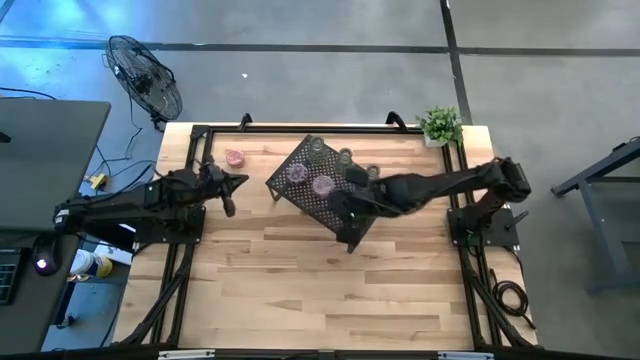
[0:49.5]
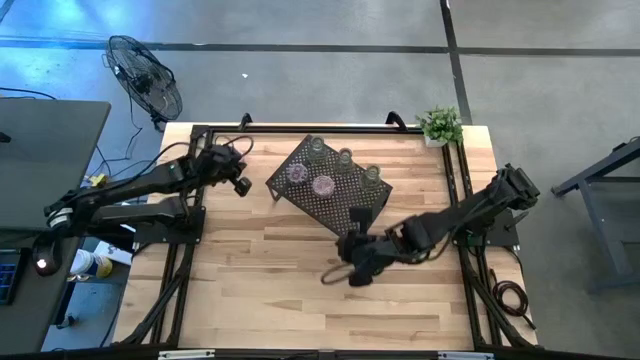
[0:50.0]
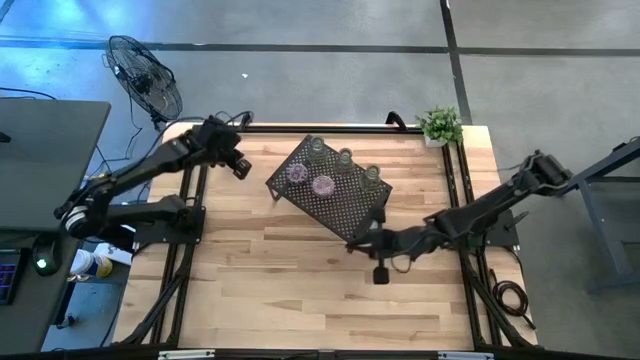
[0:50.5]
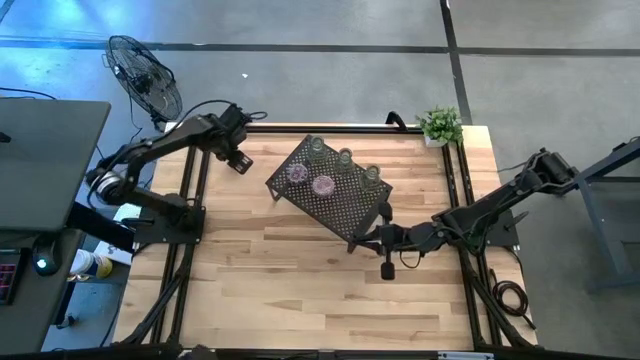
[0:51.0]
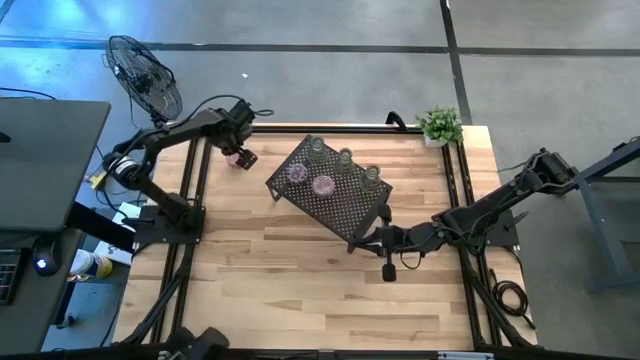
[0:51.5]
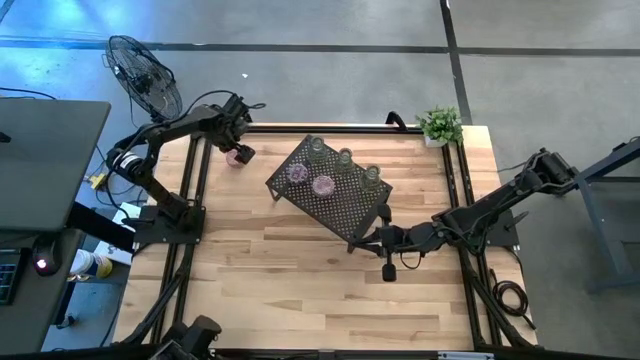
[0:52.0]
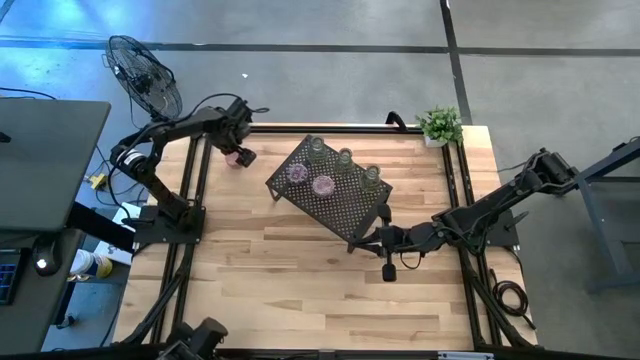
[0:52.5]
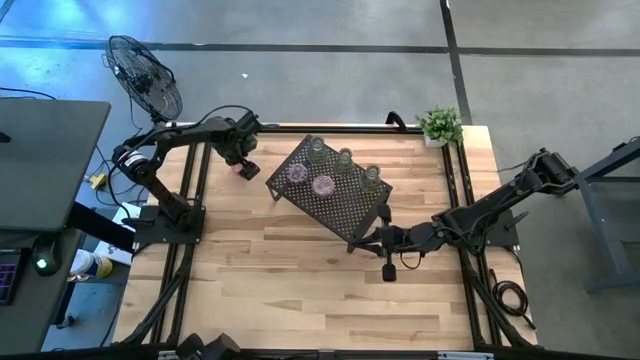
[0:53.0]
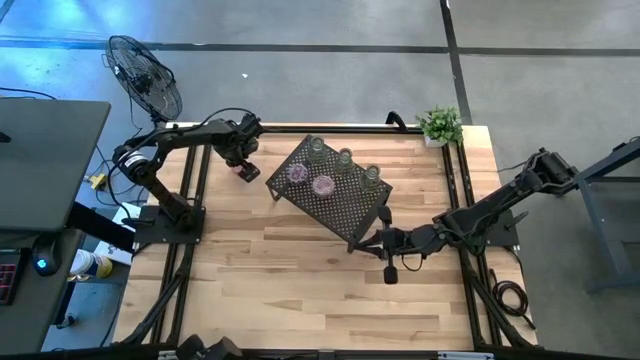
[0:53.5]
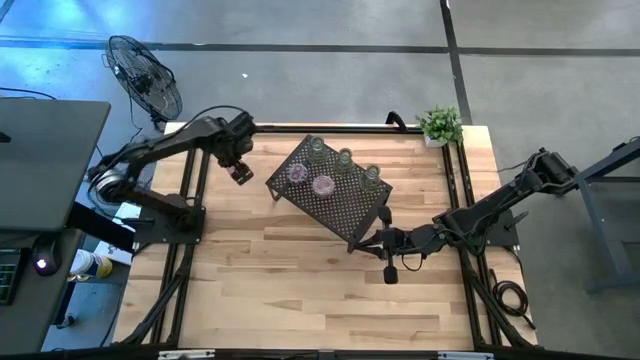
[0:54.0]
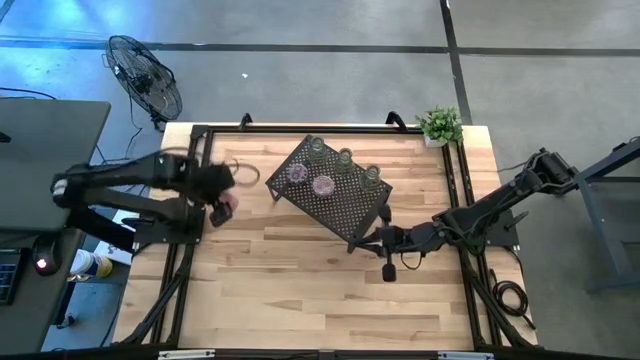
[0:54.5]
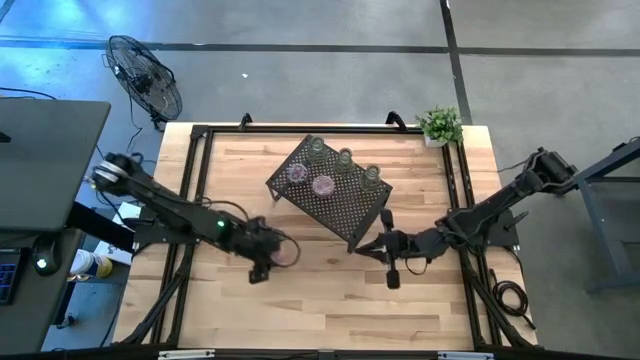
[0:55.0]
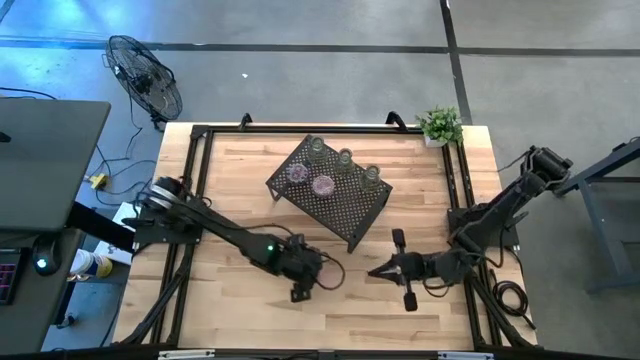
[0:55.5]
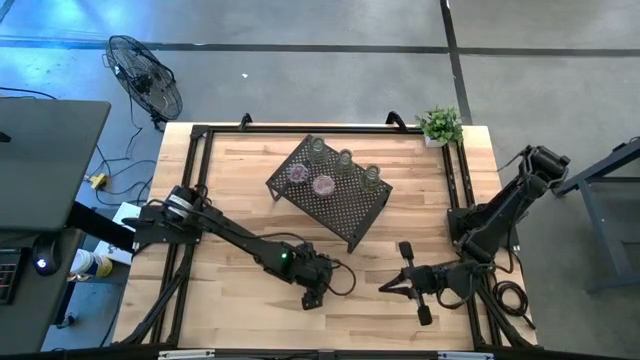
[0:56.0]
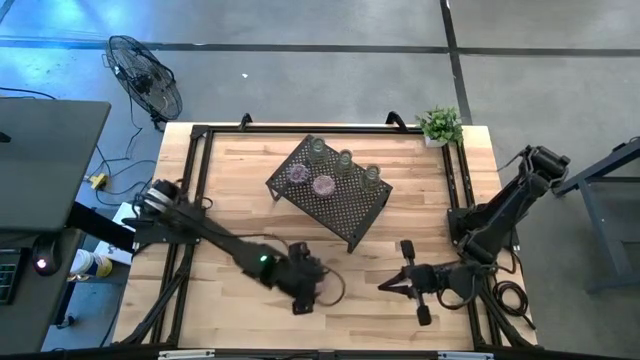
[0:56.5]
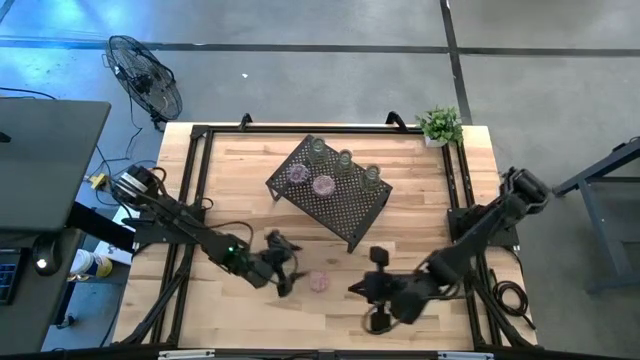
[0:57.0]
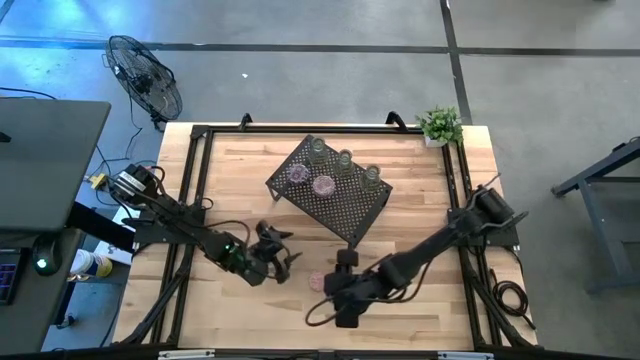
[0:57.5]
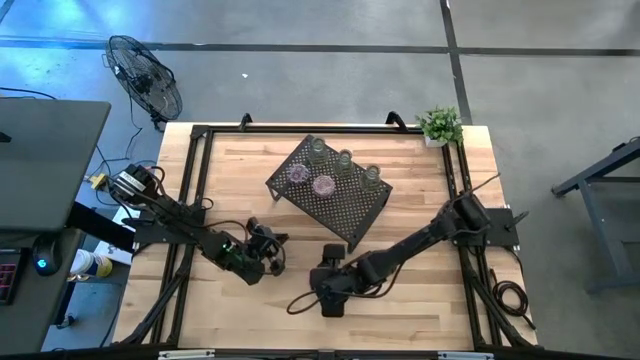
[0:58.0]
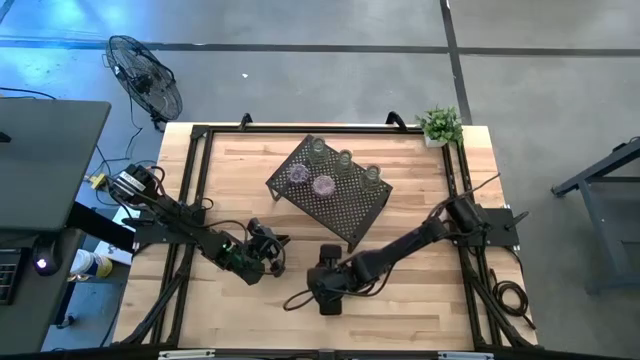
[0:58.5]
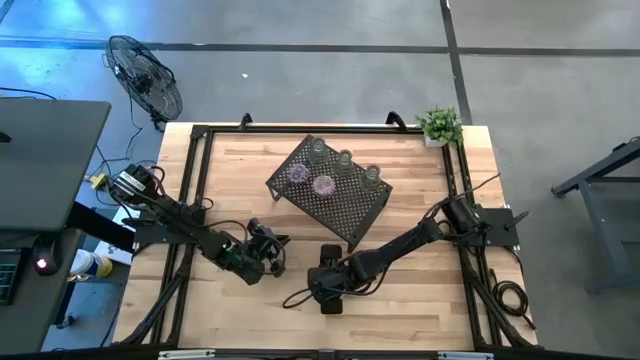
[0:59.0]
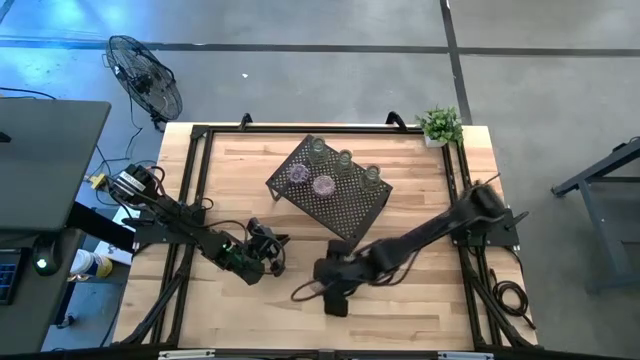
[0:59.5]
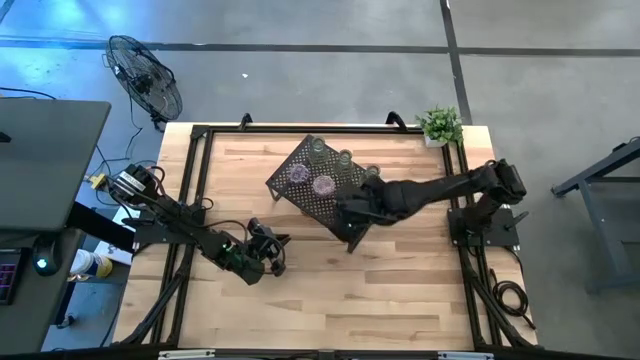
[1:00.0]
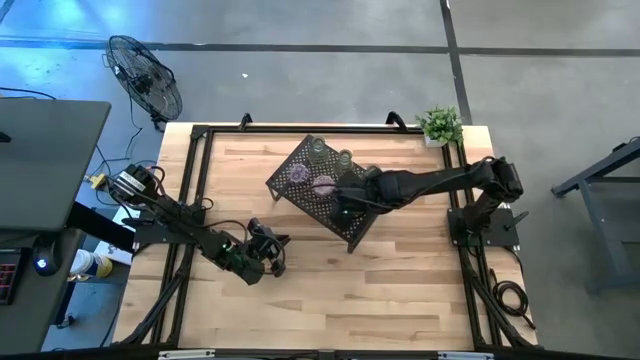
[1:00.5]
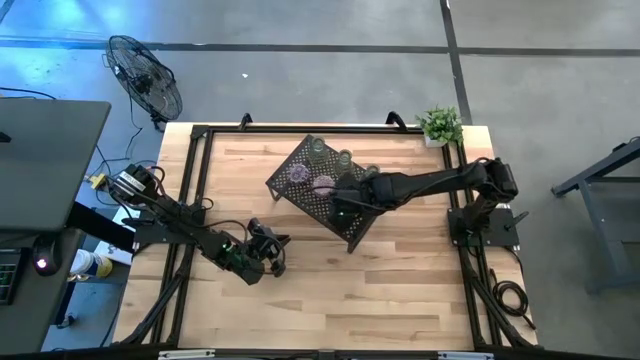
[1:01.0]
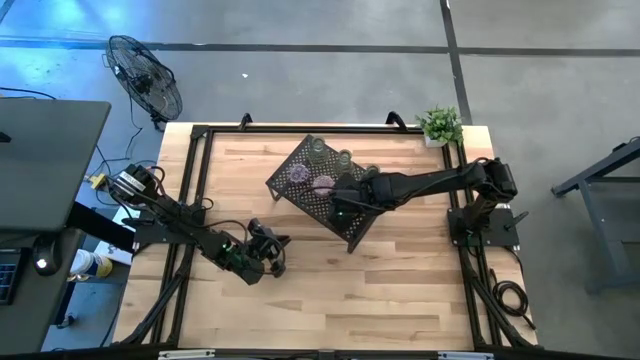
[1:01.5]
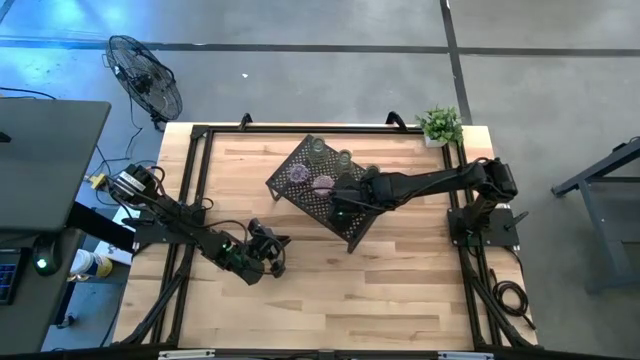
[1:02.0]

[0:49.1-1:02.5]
Task: Pick & Place candle stick holders
Put the pink scented candle on the shelf

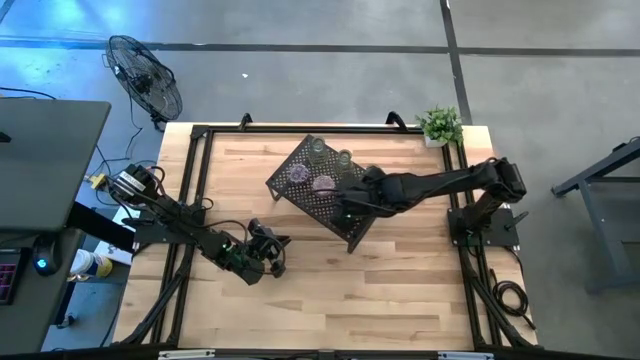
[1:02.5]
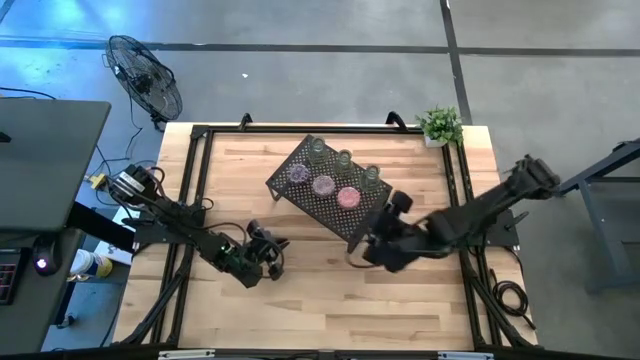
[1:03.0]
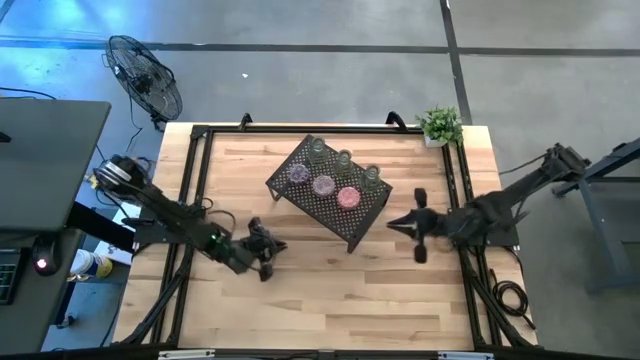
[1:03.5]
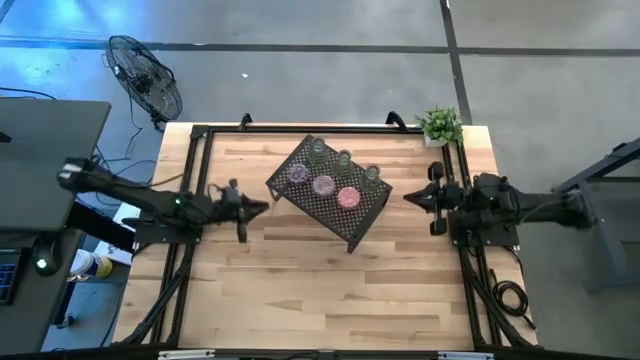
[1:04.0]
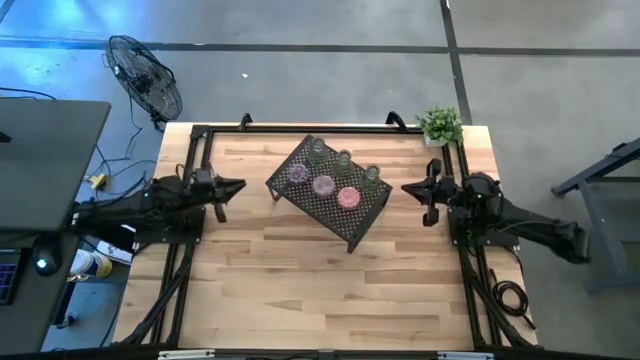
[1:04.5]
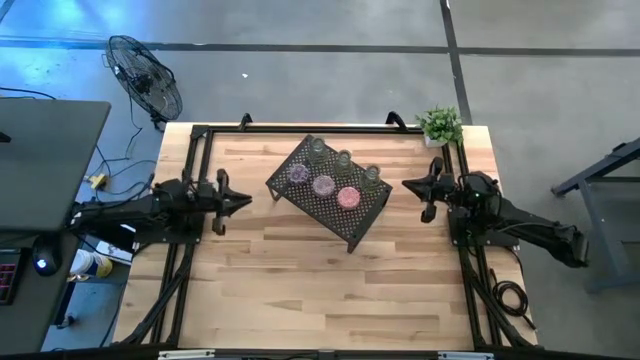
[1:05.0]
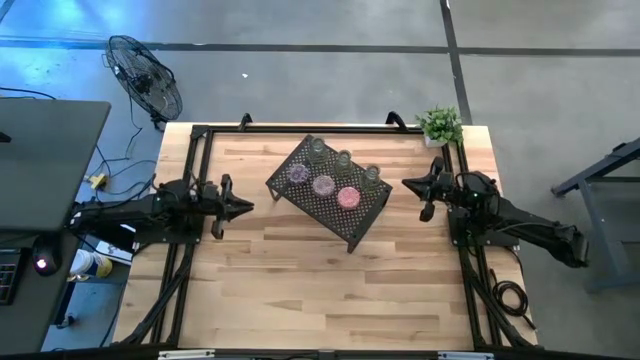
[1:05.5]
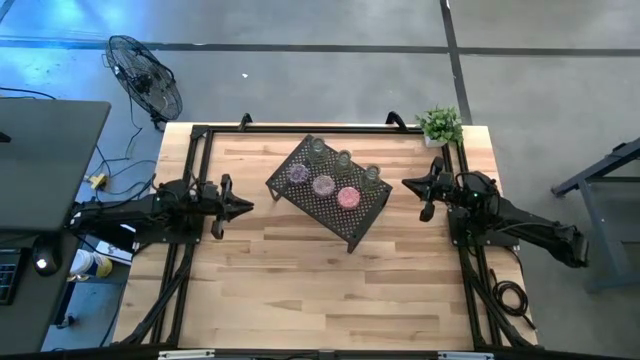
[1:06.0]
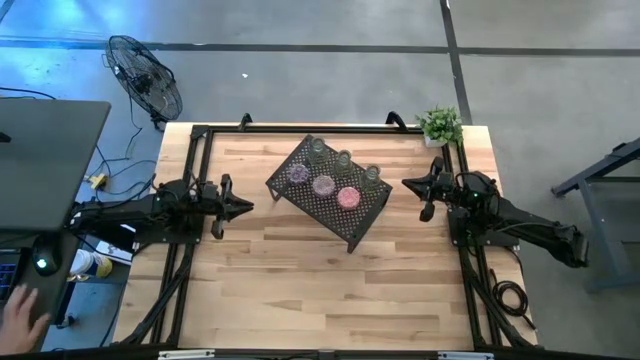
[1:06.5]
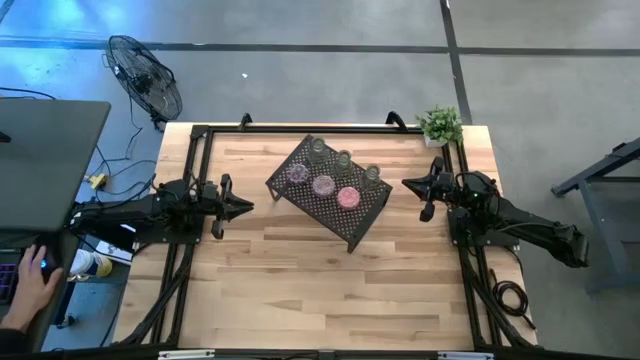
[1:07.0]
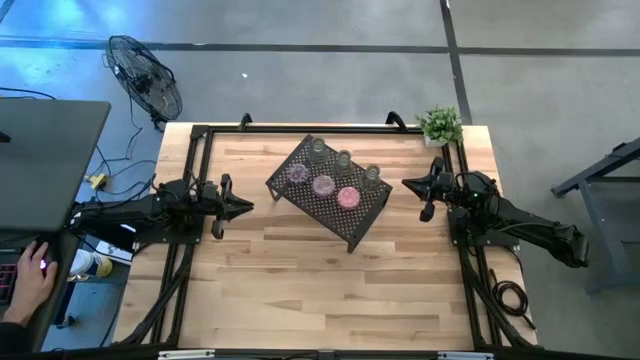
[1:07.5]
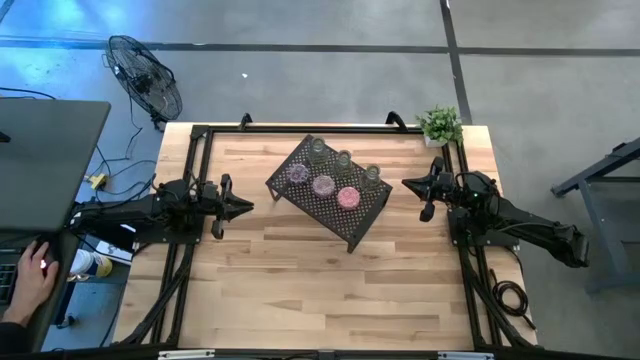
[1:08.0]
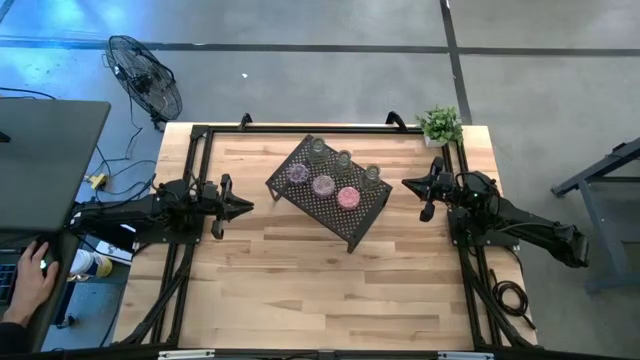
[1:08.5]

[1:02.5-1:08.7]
Return to Home Position
